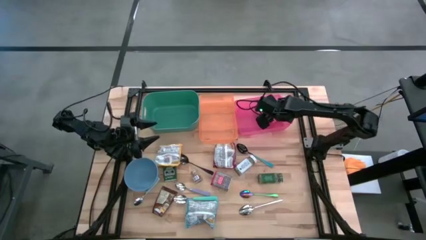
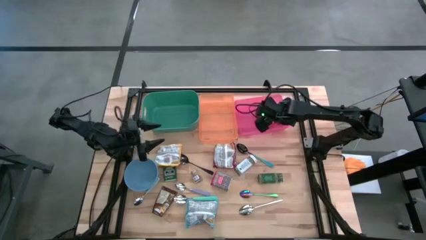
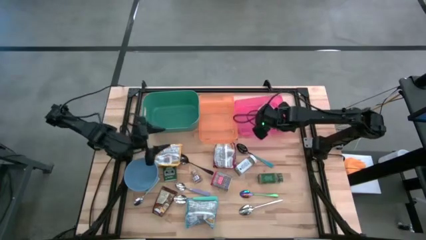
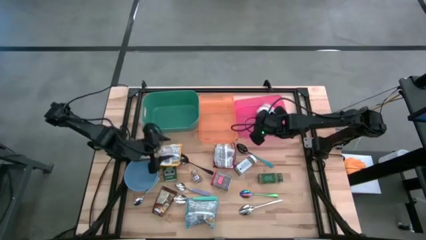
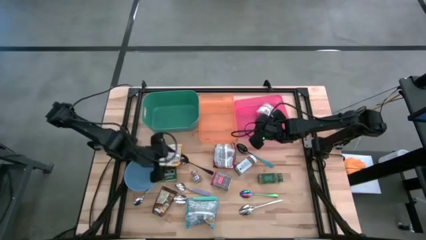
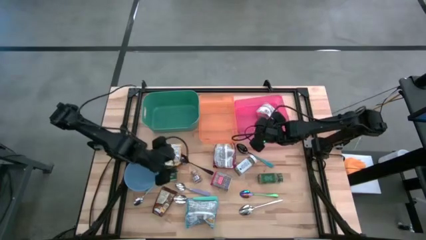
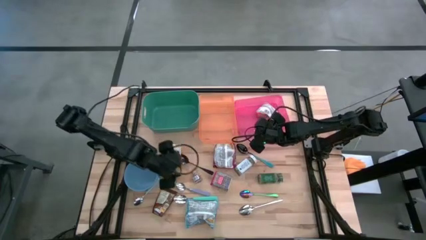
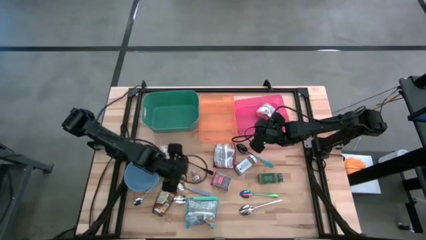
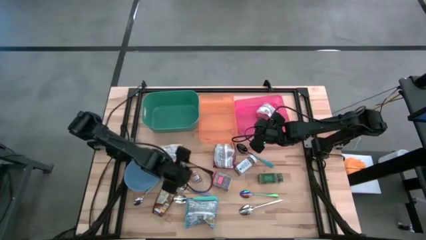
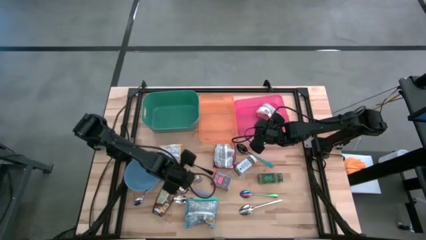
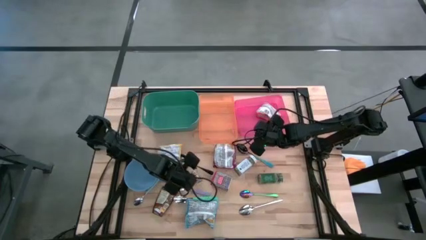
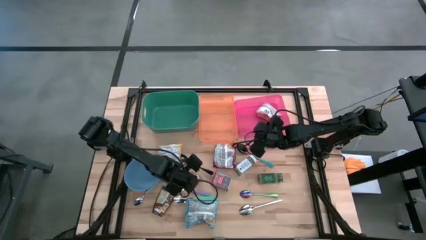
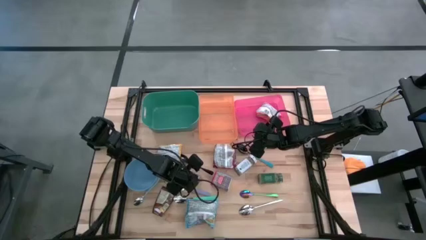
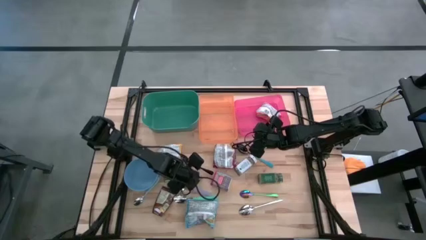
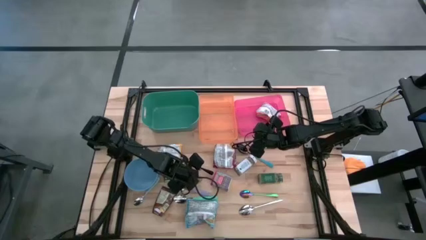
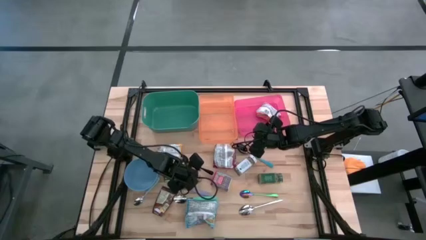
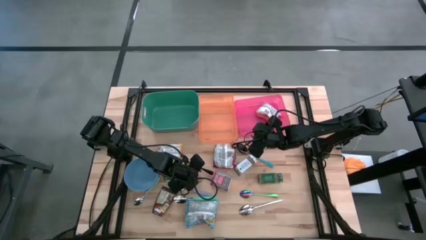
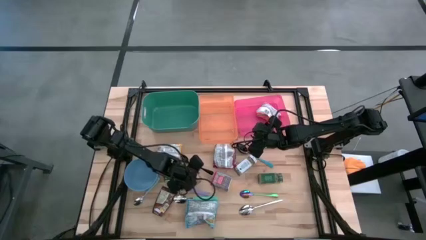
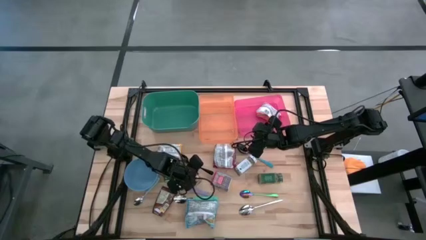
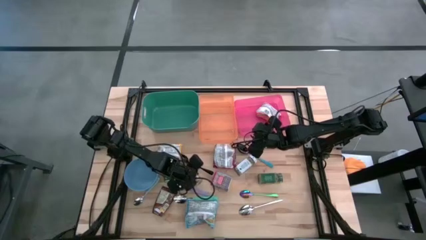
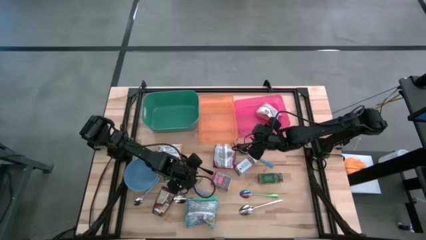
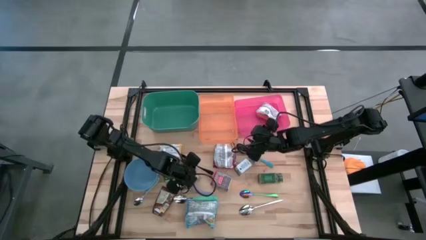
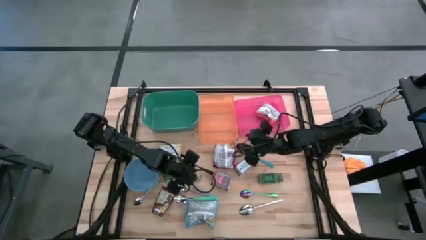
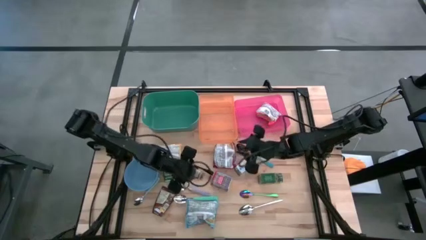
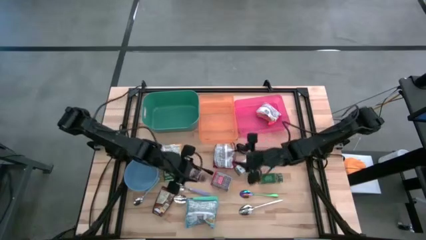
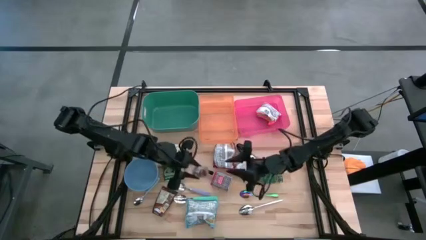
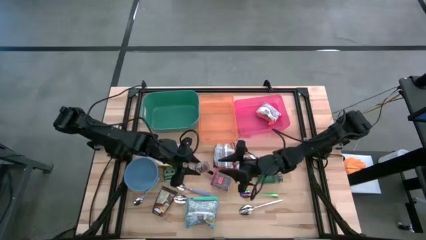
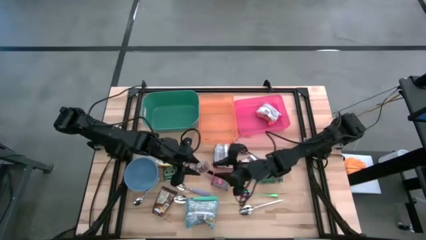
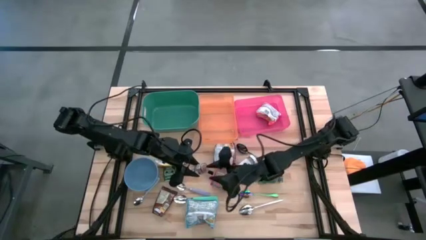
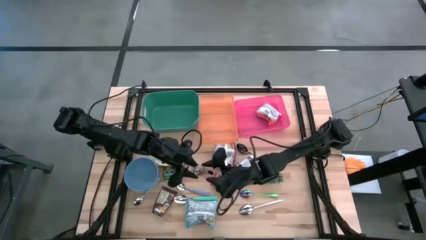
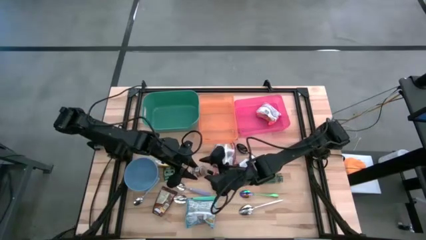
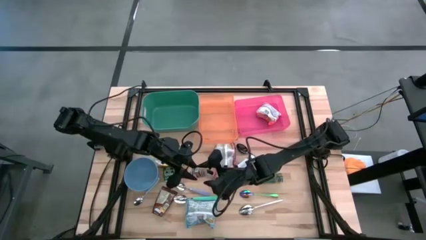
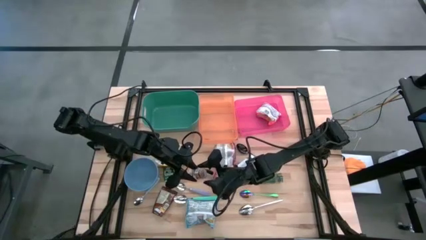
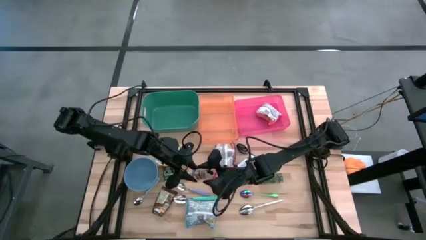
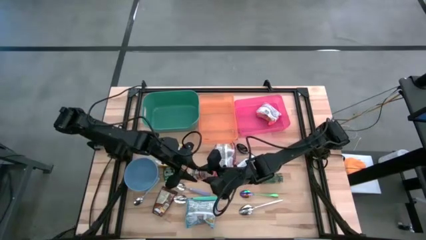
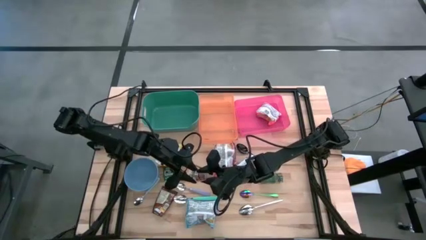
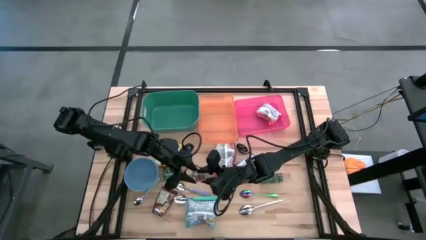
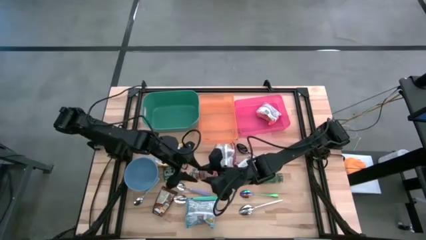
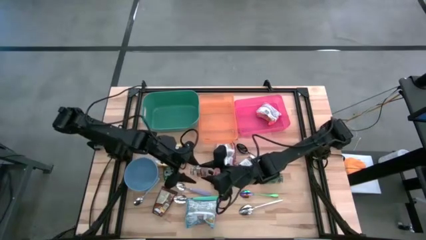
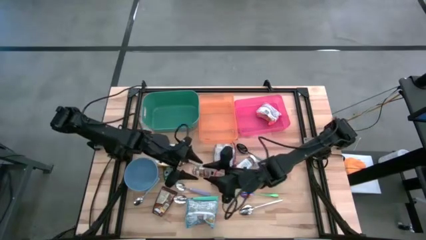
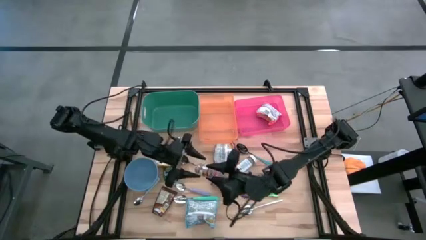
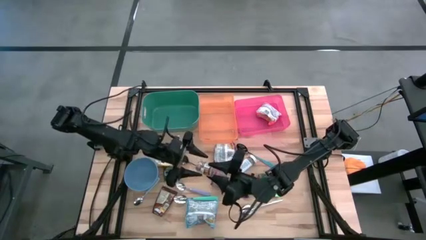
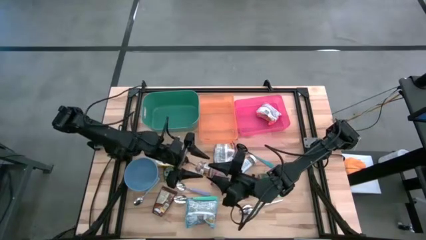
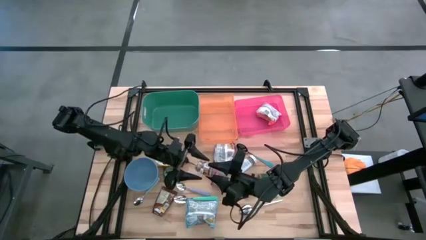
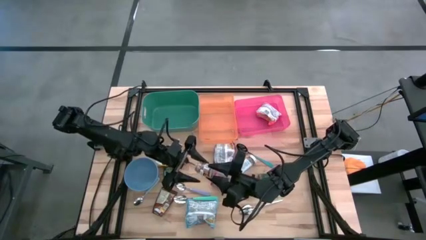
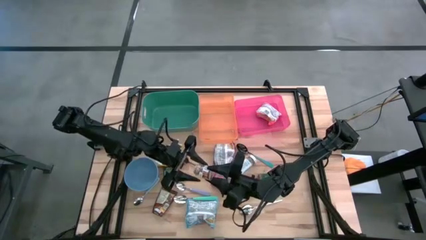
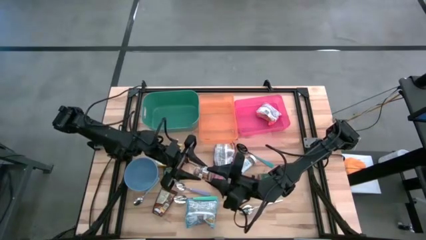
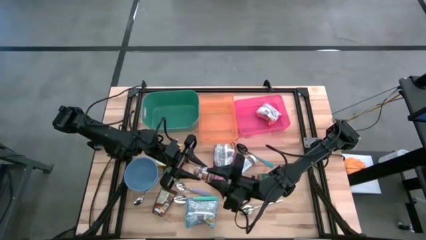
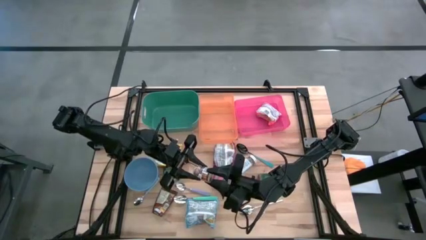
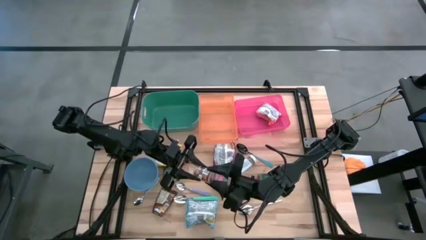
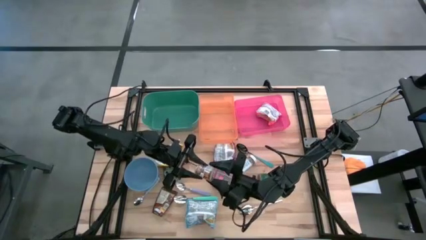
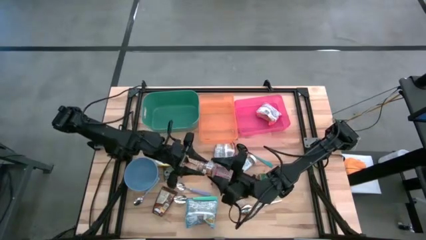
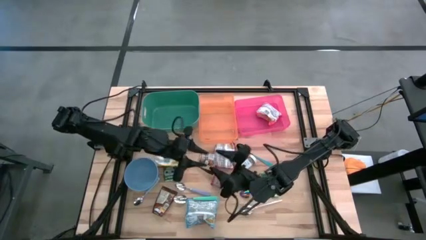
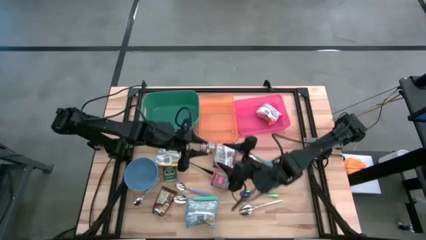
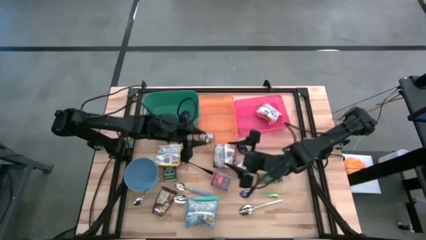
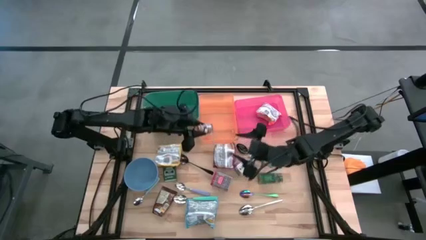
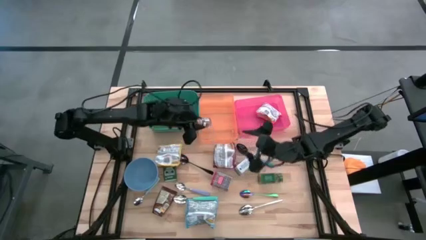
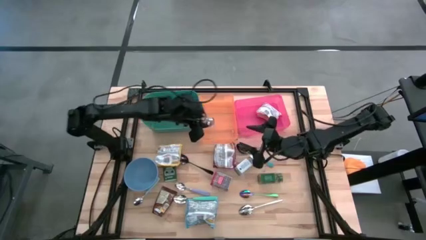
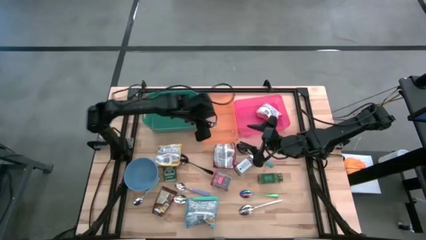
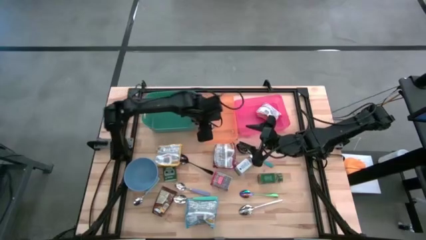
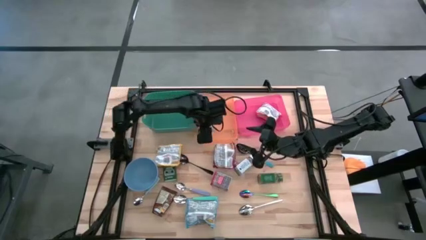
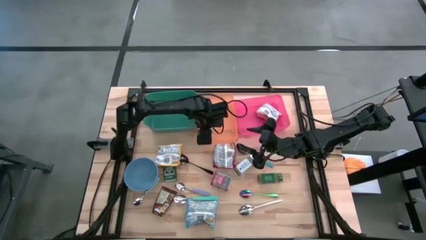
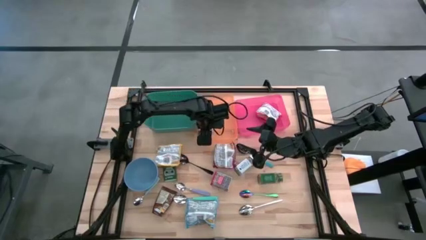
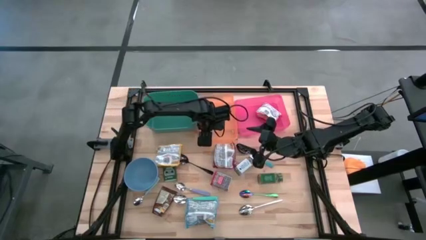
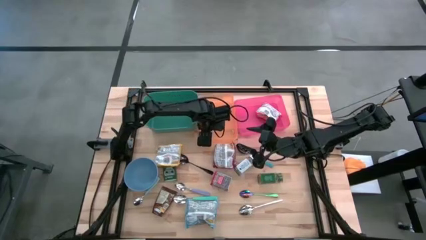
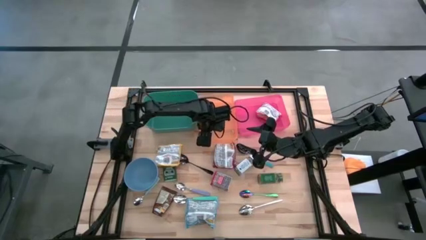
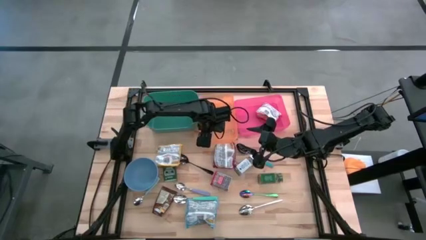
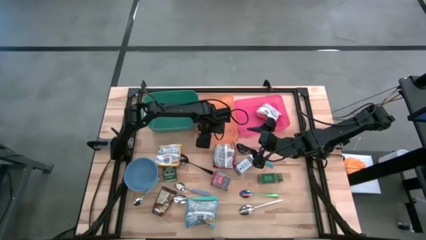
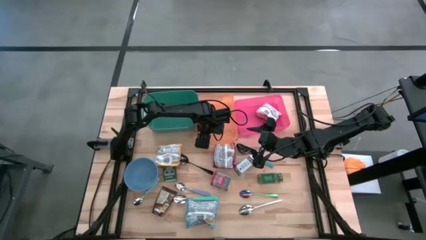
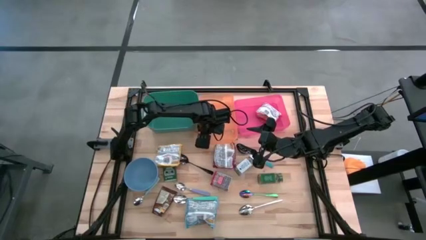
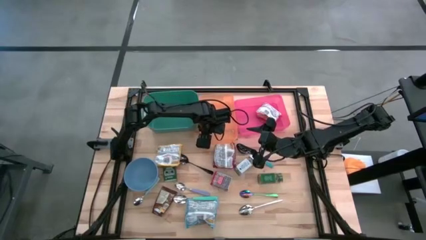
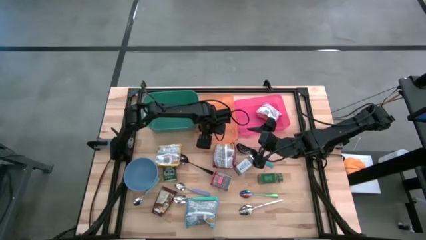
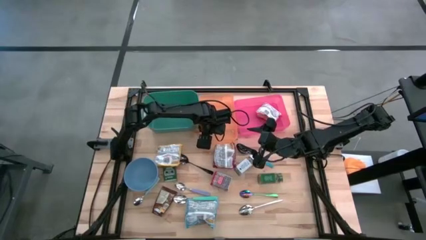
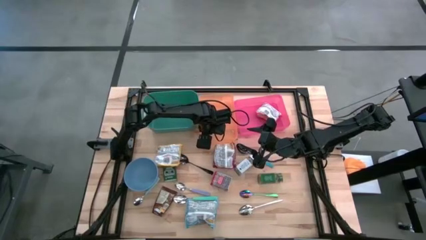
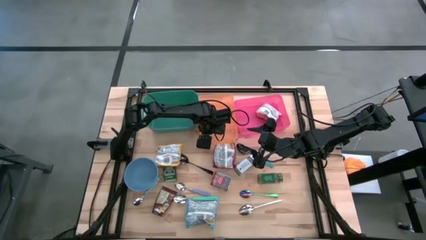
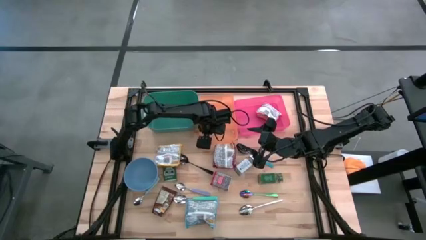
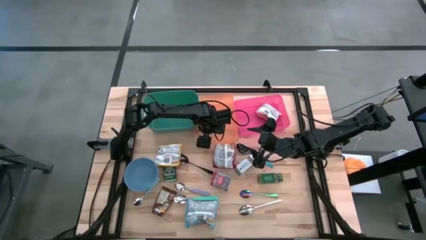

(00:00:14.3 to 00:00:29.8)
Put the brown seasoning bottle into the orange bin
